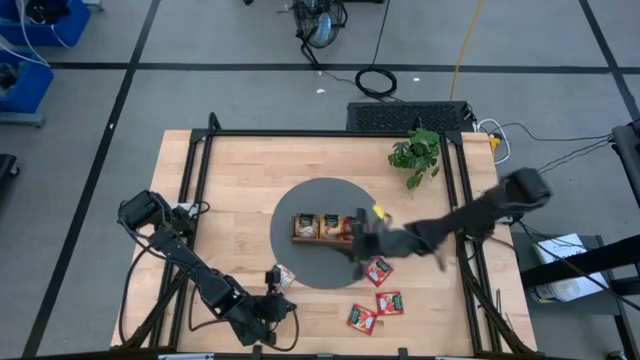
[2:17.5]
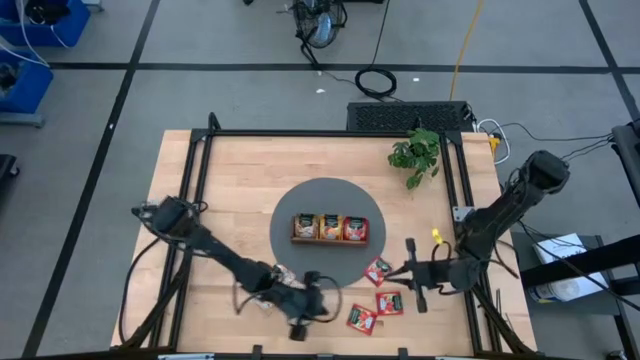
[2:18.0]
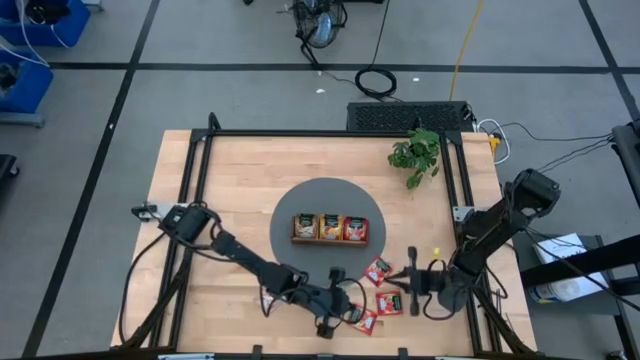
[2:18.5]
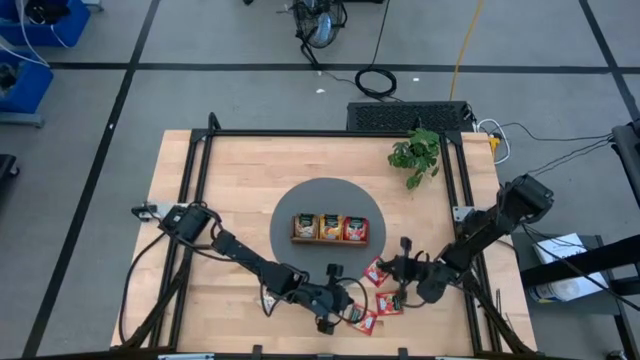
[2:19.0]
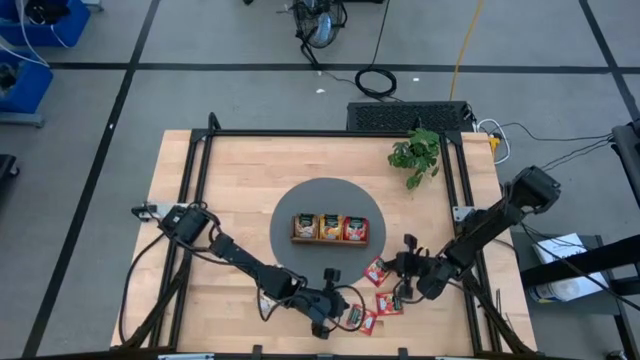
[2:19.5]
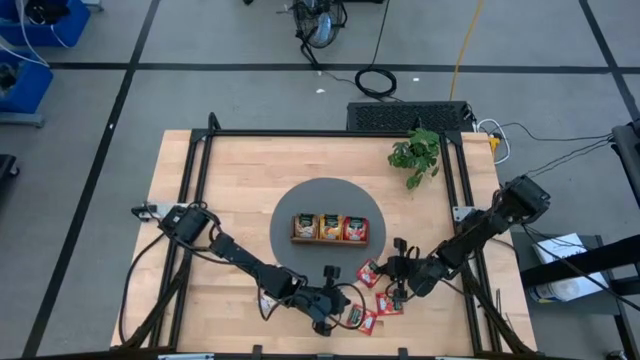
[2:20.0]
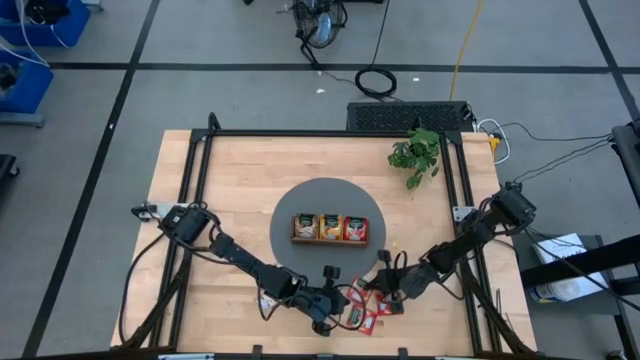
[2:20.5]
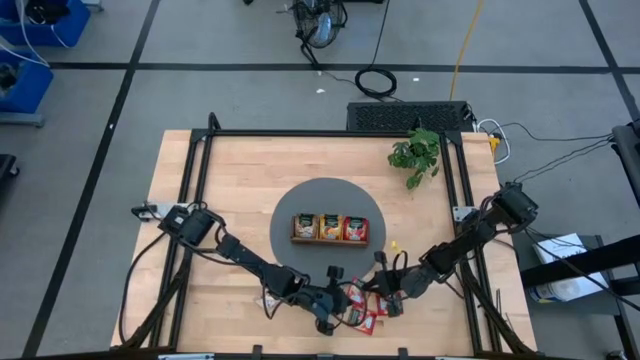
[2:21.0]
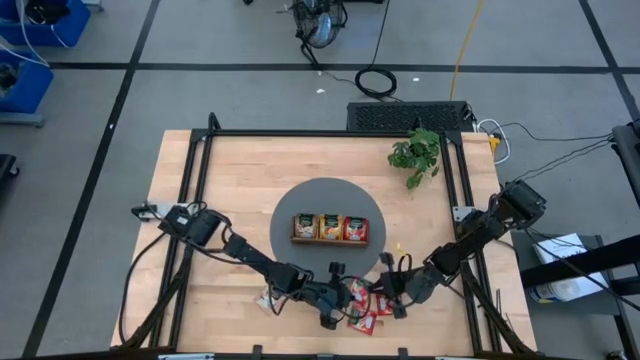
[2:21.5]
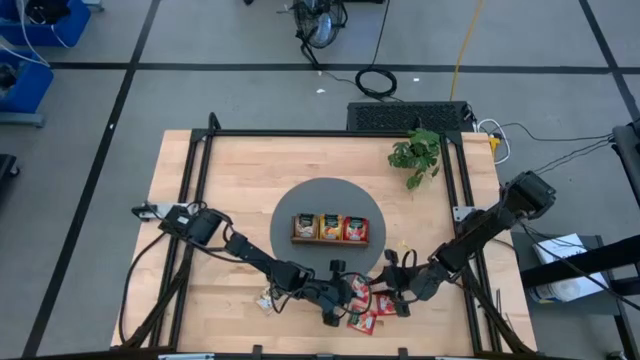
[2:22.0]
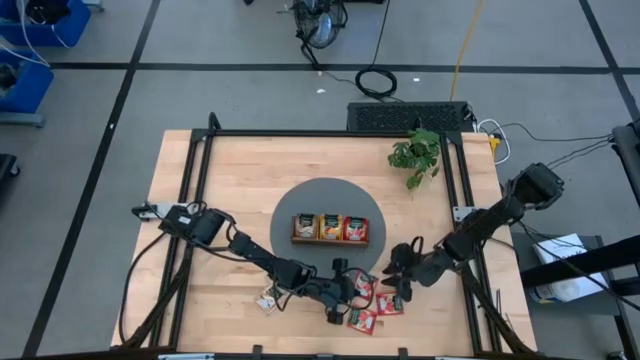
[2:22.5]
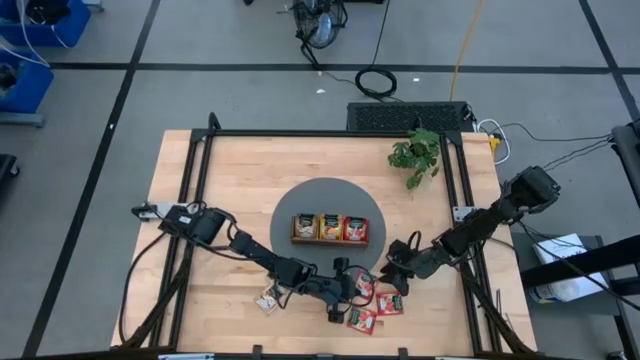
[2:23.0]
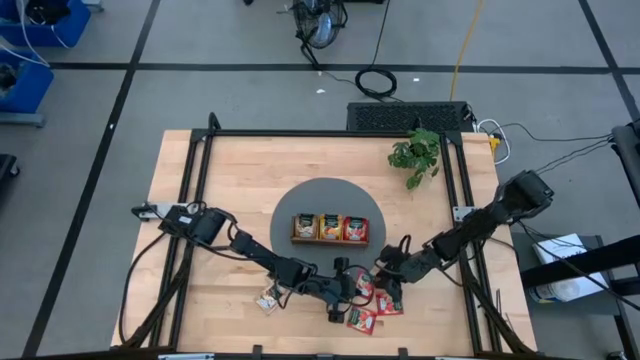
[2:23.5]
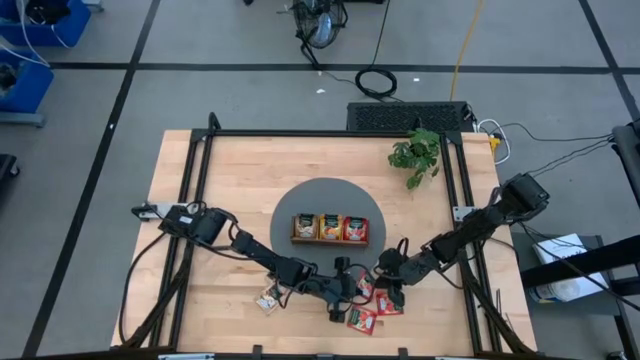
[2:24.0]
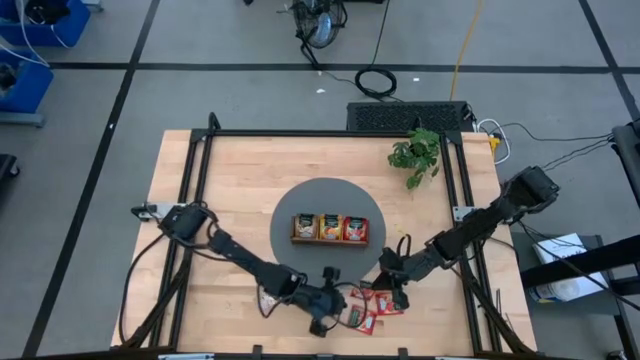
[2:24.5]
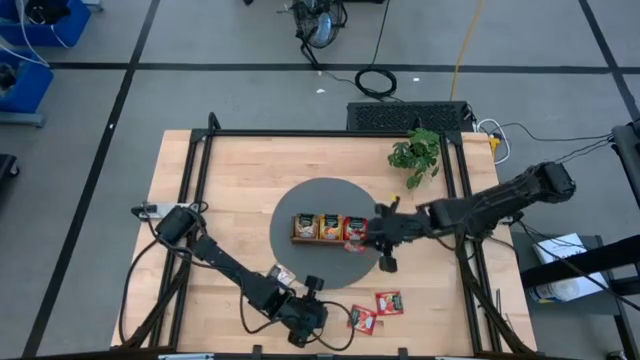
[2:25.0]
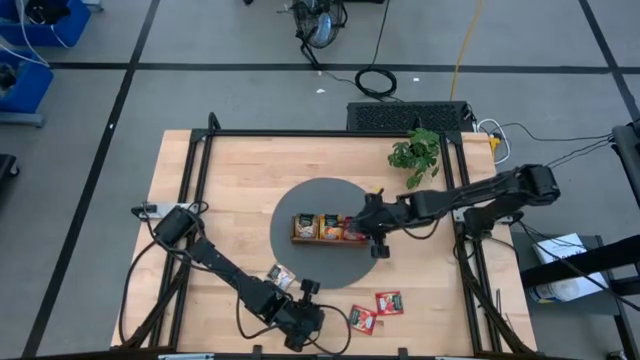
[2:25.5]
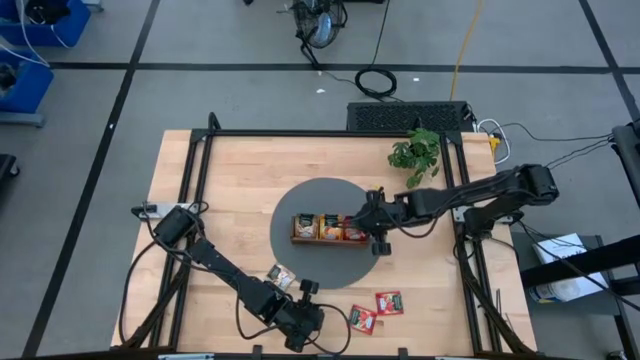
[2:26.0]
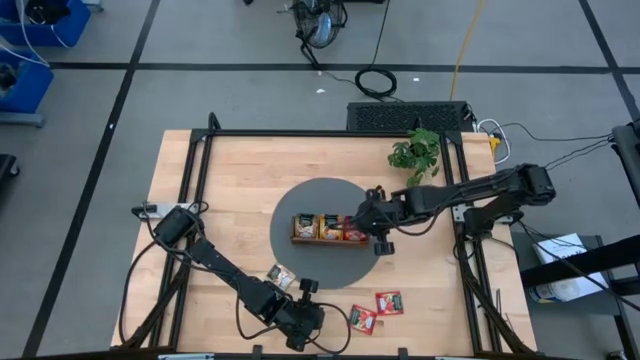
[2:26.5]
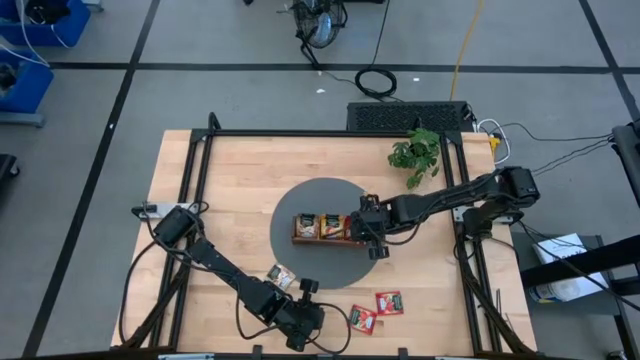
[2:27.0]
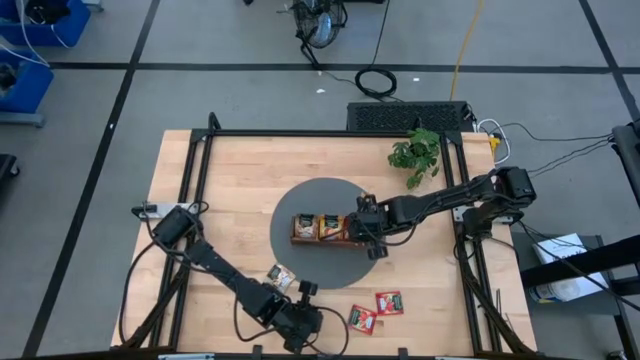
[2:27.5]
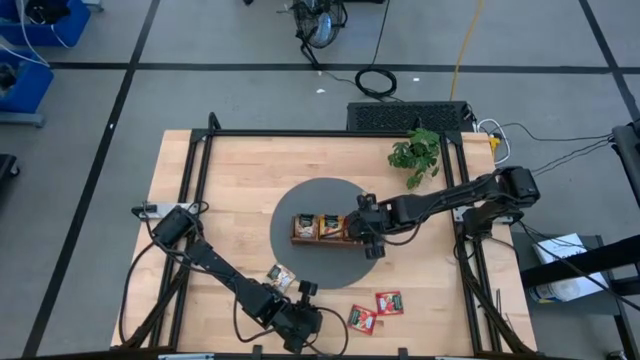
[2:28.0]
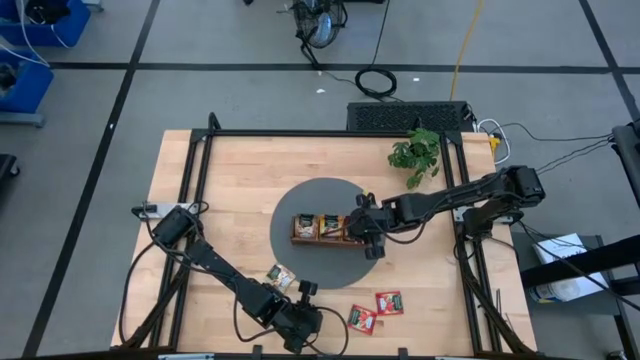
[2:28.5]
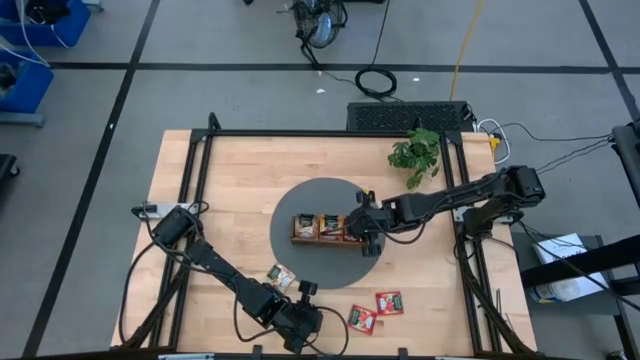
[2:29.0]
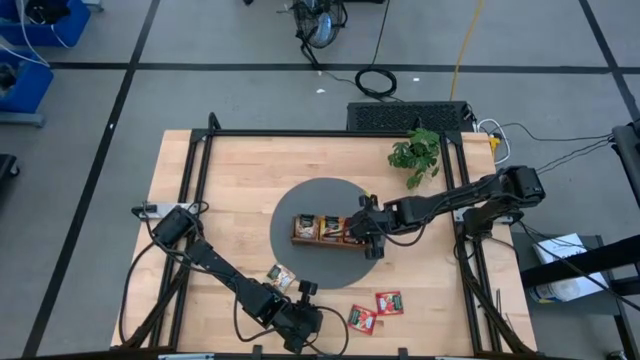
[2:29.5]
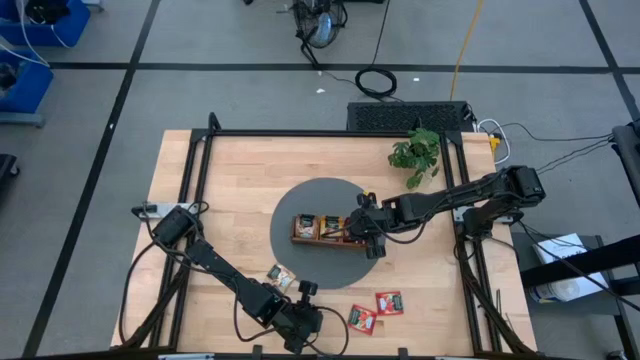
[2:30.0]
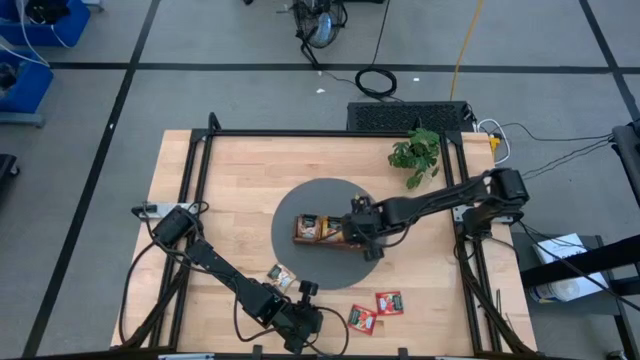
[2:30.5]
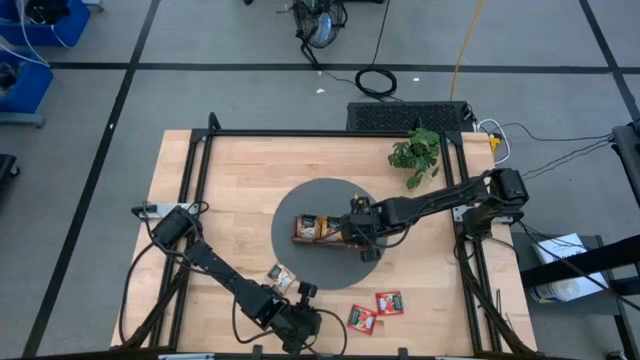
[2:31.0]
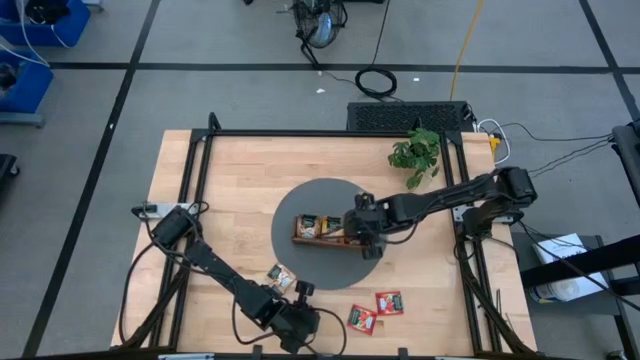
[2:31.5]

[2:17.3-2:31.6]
Task: Pick & Place Tea
Put the red tea bag into the right section of the wooden organizer

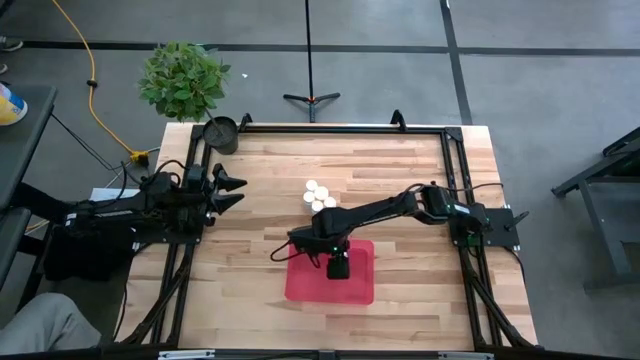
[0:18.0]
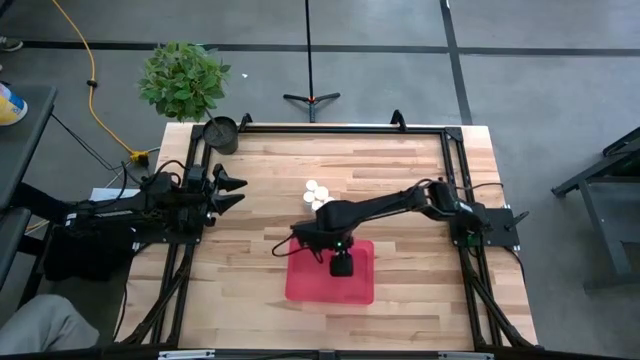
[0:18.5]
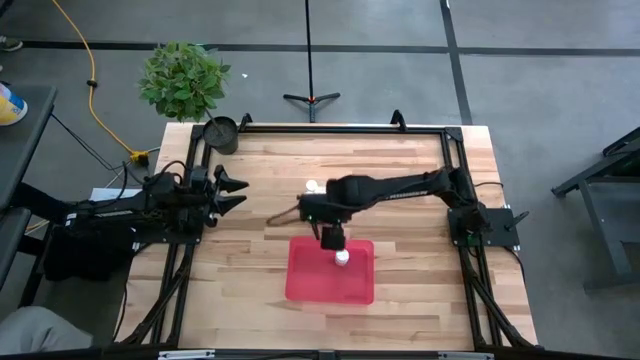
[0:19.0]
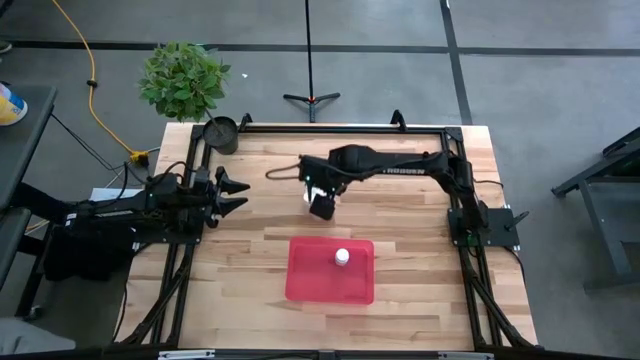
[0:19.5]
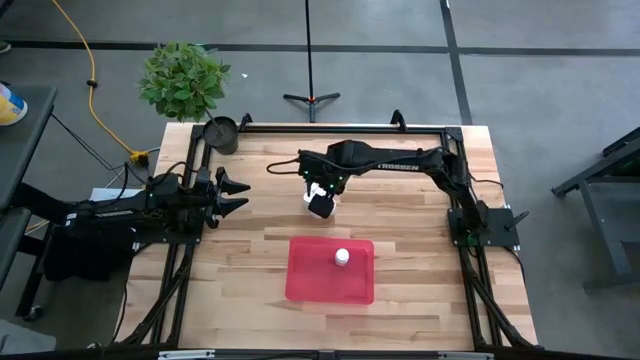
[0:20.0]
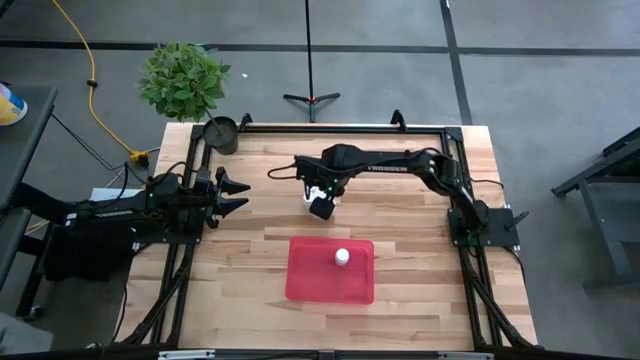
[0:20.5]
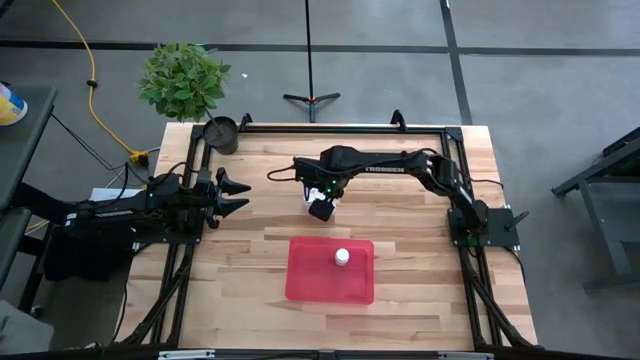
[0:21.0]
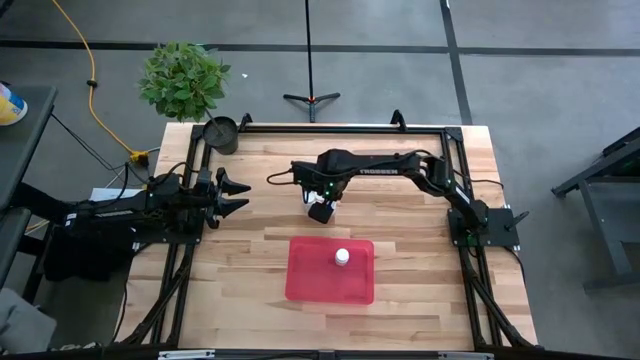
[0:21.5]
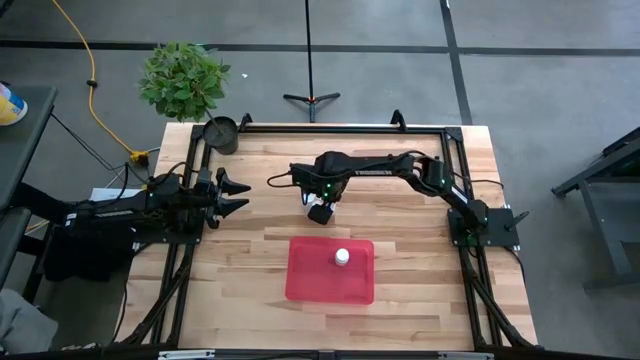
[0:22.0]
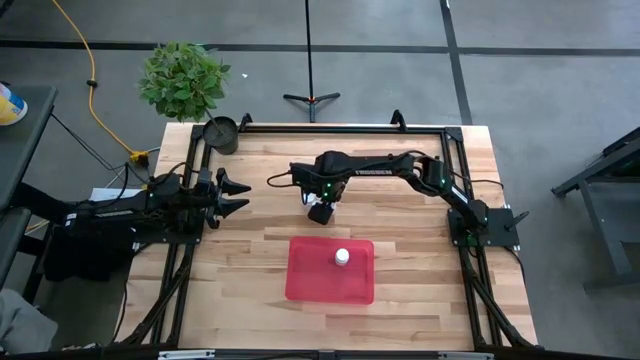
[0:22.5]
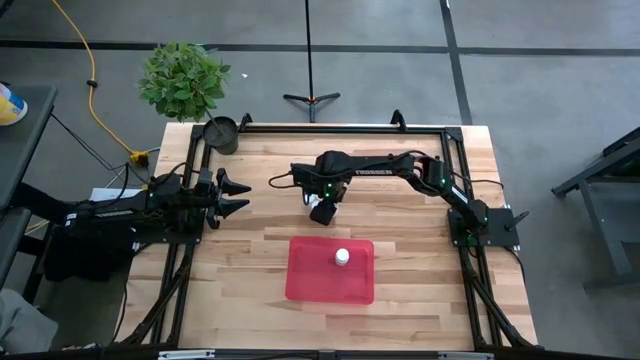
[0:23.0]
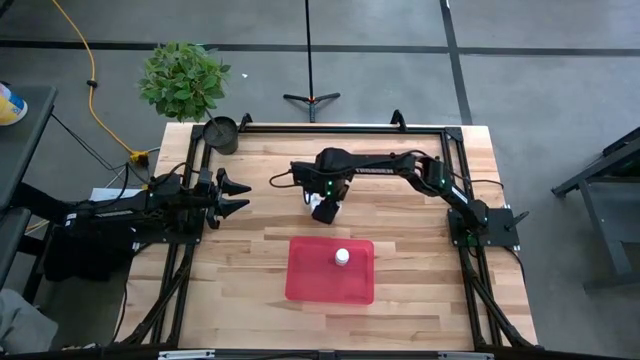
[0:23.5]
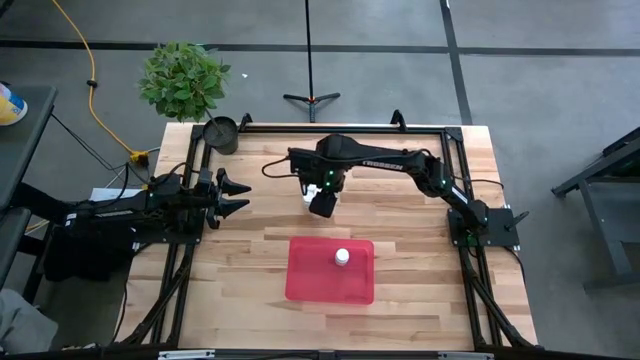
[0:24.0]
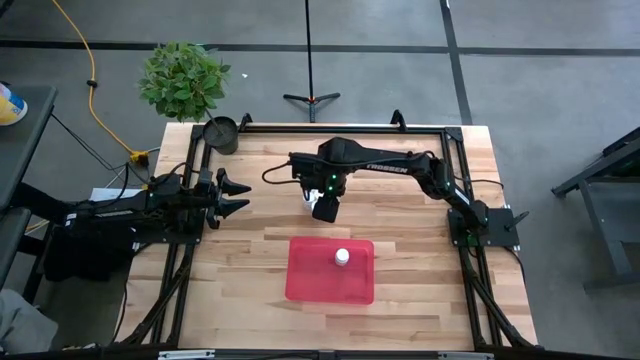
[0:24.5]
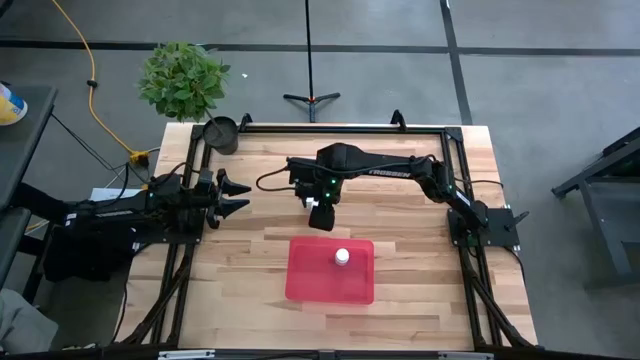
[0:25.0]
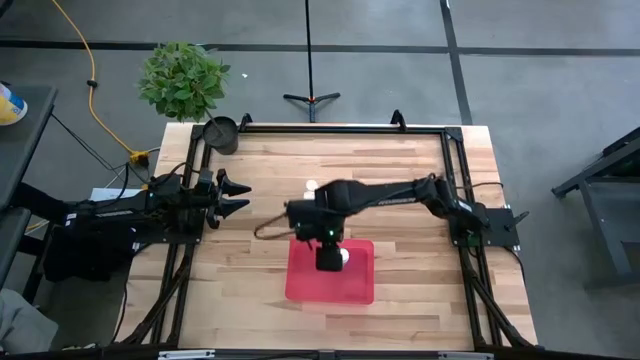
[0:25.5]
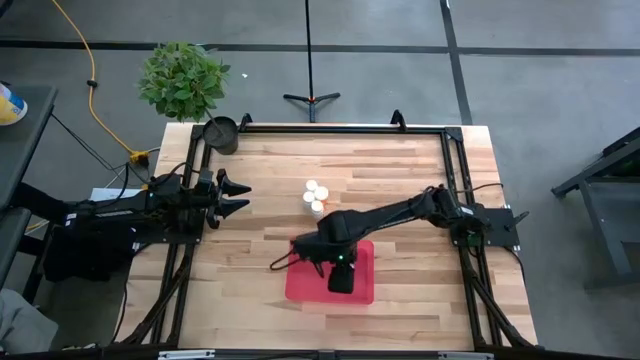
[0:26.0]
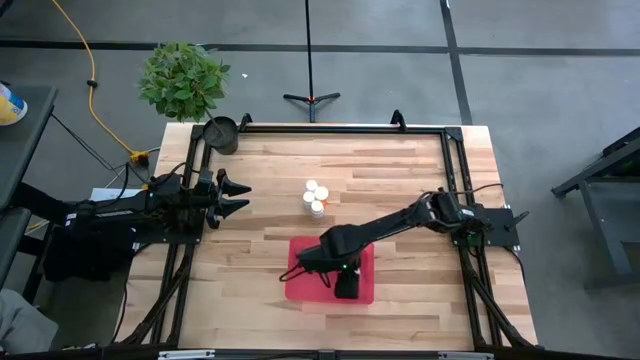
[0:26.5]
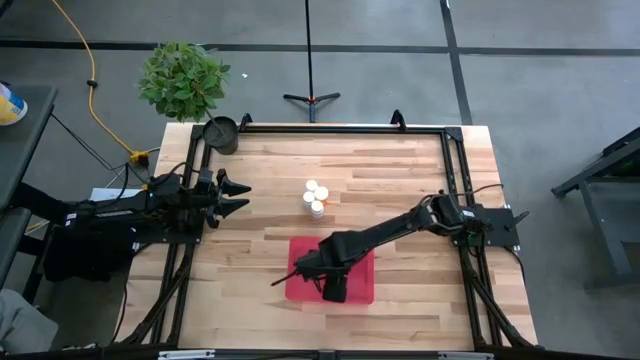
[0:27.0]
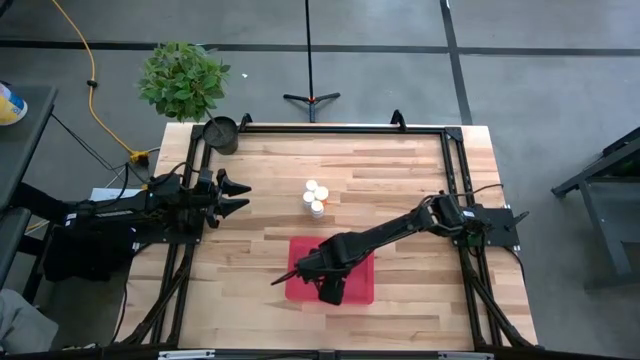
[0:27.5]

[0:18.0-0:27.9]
Task: Pick and place pill bottles into a basket
Put the white pill bottle into the bin
